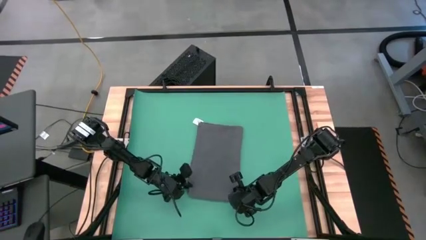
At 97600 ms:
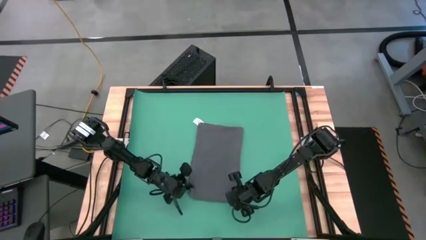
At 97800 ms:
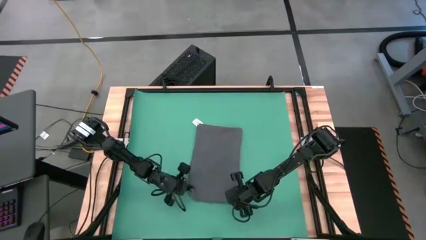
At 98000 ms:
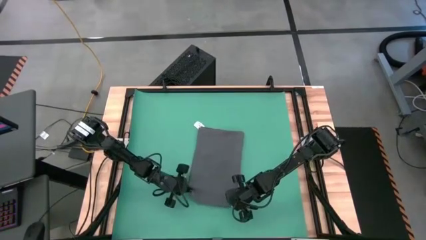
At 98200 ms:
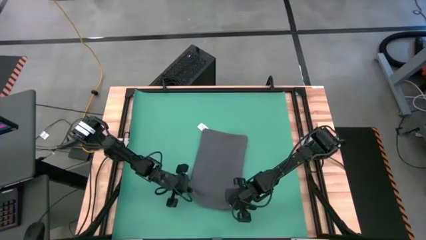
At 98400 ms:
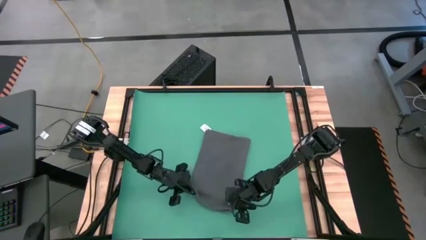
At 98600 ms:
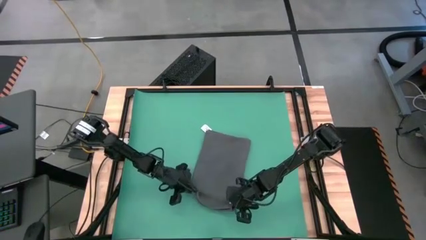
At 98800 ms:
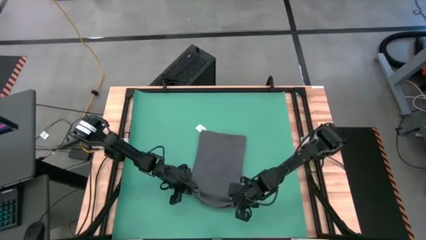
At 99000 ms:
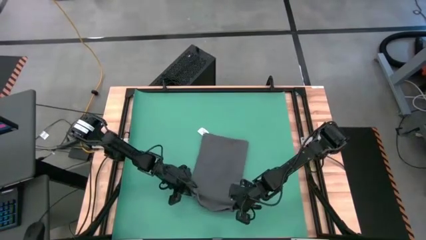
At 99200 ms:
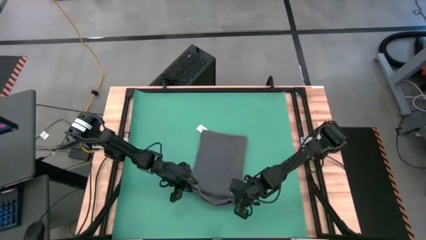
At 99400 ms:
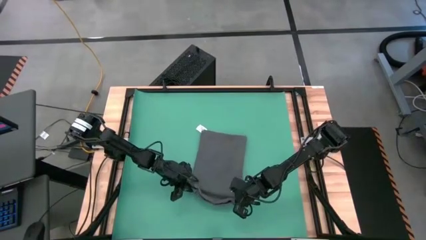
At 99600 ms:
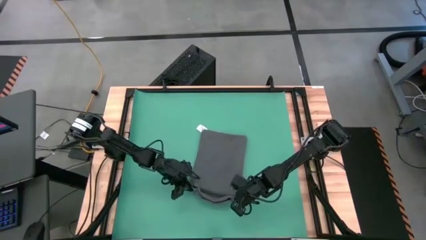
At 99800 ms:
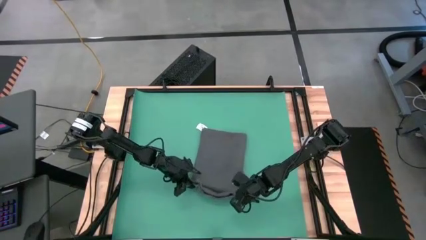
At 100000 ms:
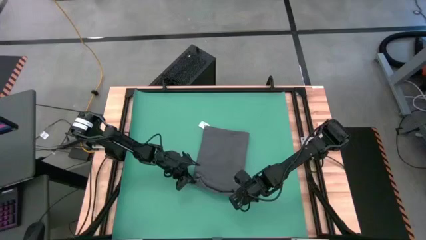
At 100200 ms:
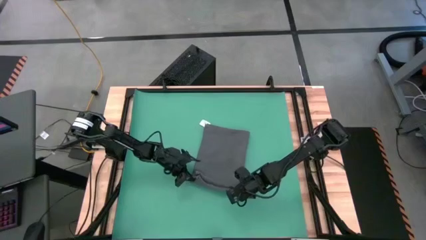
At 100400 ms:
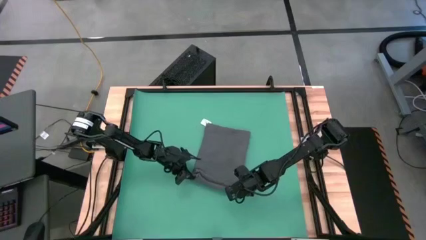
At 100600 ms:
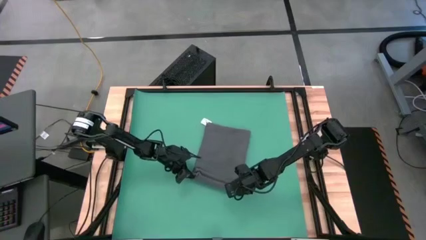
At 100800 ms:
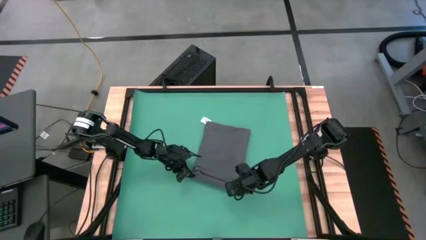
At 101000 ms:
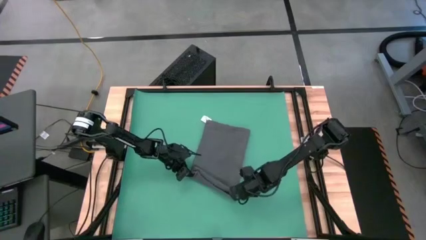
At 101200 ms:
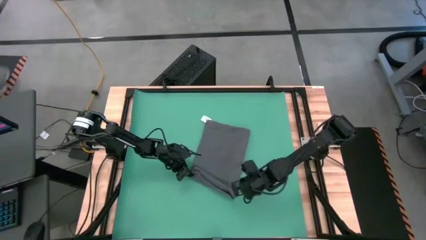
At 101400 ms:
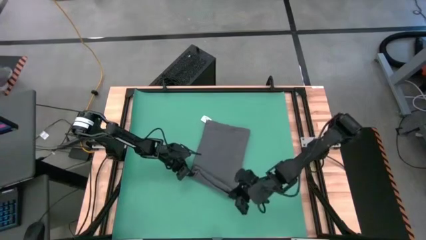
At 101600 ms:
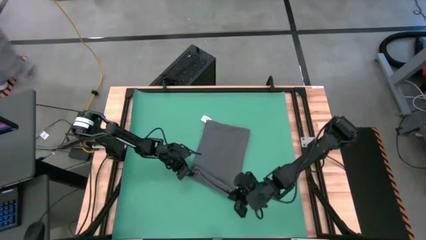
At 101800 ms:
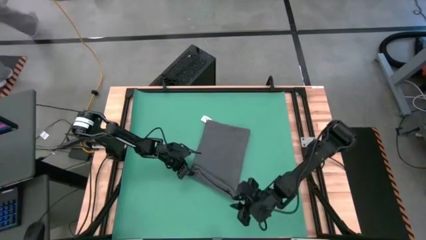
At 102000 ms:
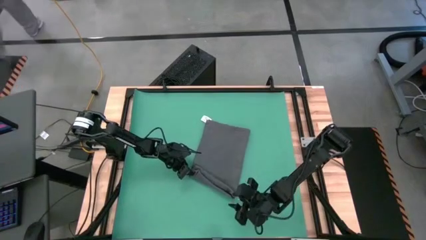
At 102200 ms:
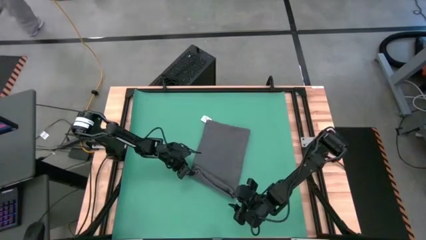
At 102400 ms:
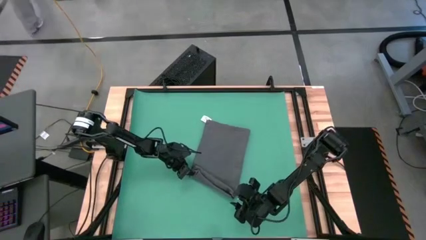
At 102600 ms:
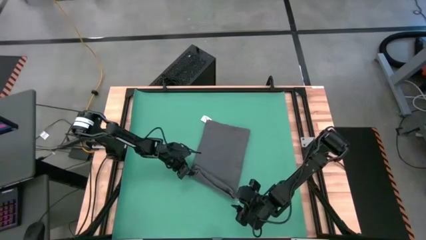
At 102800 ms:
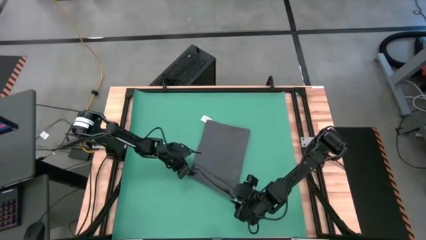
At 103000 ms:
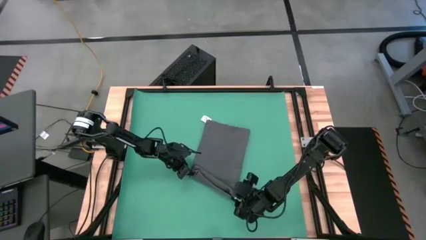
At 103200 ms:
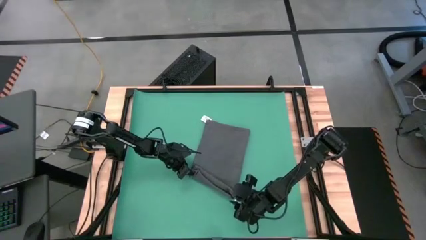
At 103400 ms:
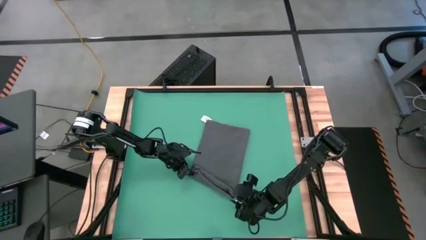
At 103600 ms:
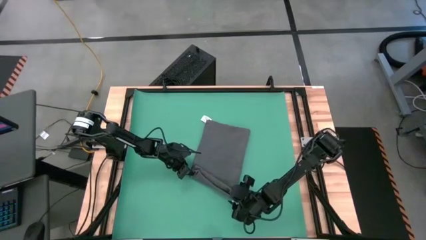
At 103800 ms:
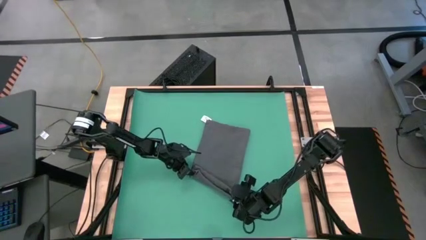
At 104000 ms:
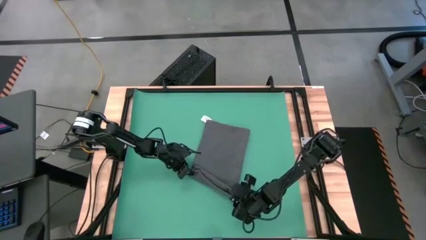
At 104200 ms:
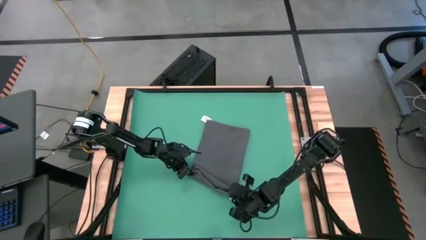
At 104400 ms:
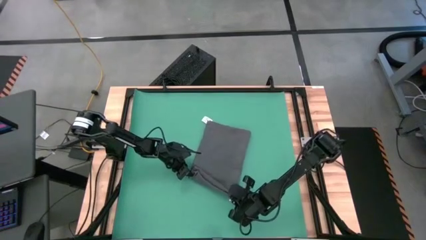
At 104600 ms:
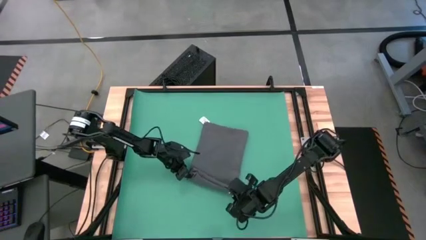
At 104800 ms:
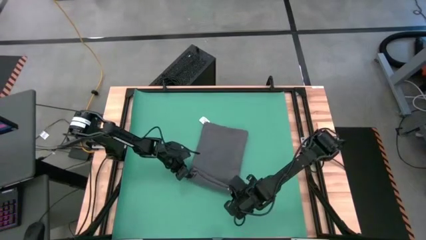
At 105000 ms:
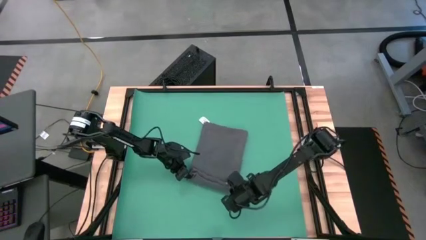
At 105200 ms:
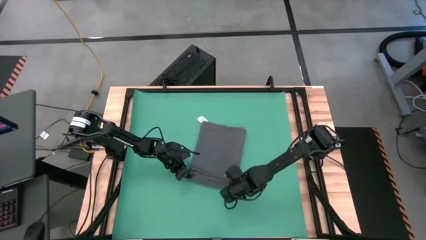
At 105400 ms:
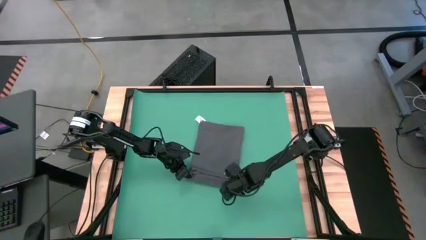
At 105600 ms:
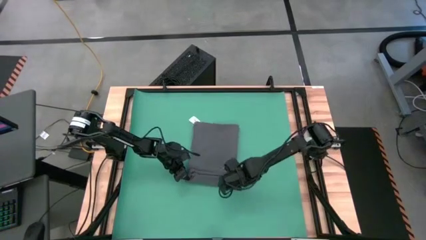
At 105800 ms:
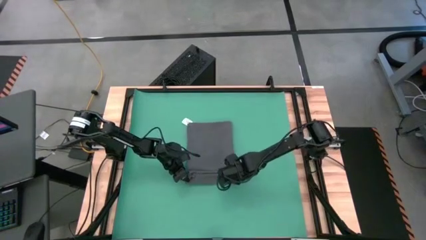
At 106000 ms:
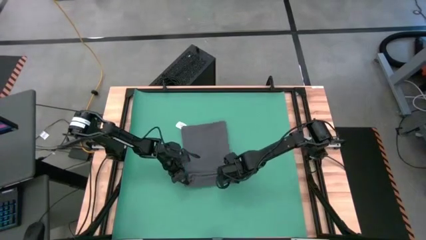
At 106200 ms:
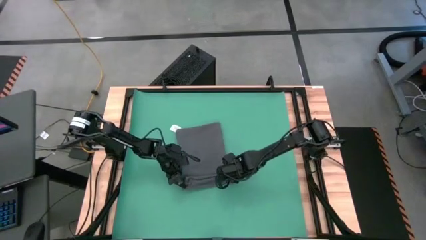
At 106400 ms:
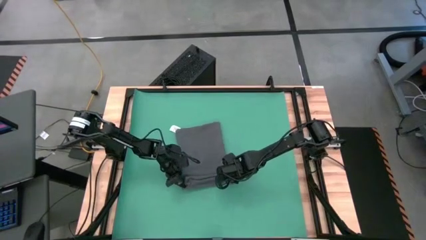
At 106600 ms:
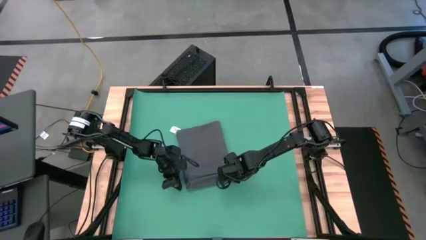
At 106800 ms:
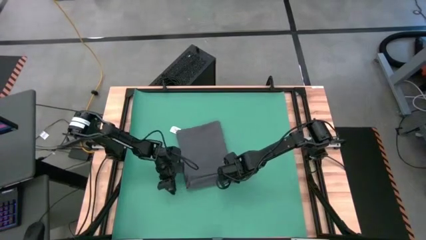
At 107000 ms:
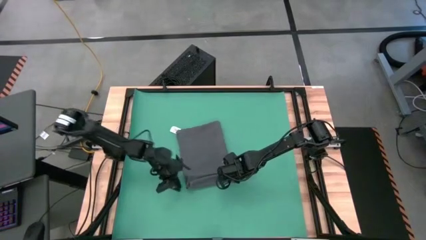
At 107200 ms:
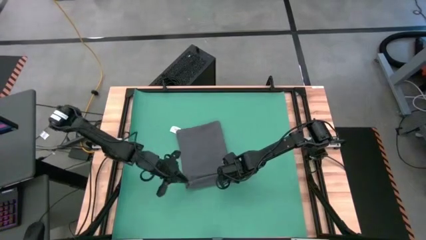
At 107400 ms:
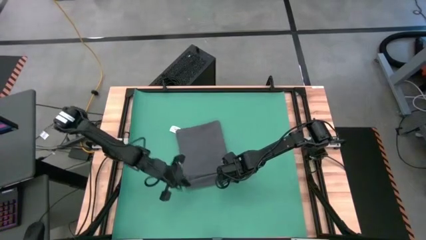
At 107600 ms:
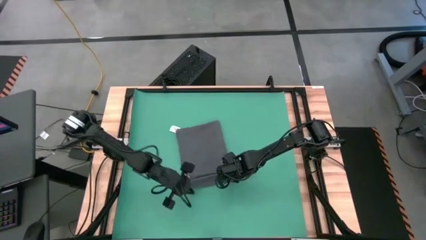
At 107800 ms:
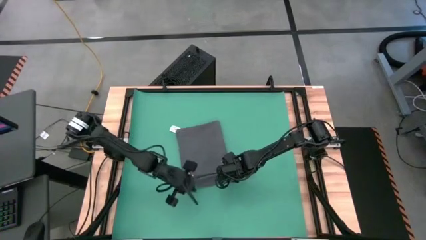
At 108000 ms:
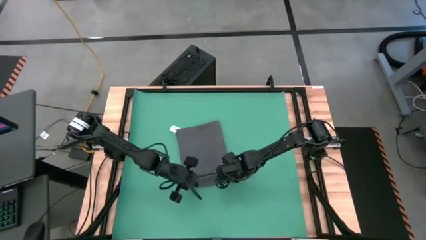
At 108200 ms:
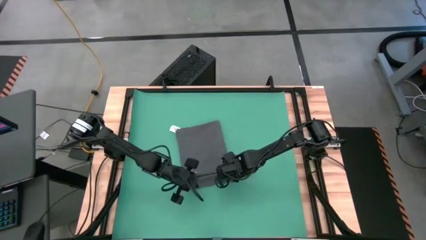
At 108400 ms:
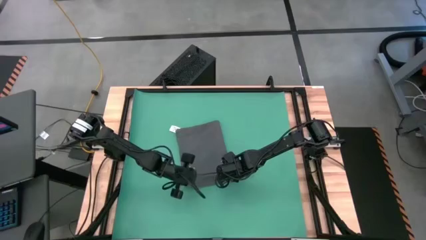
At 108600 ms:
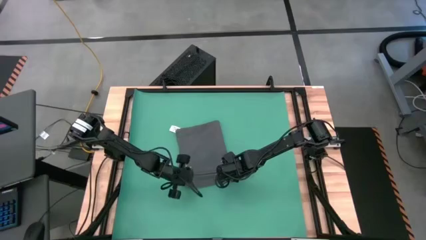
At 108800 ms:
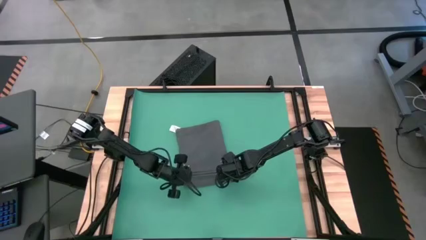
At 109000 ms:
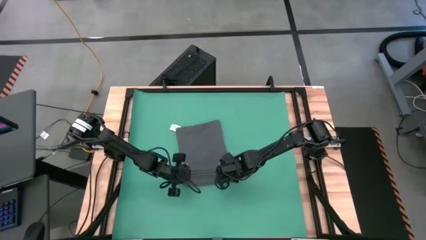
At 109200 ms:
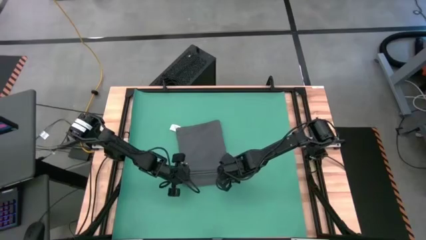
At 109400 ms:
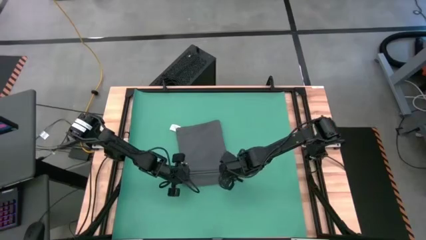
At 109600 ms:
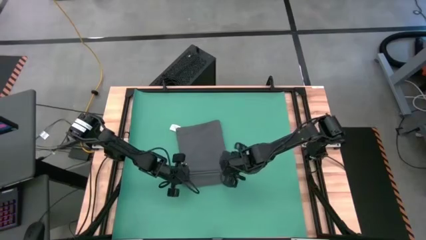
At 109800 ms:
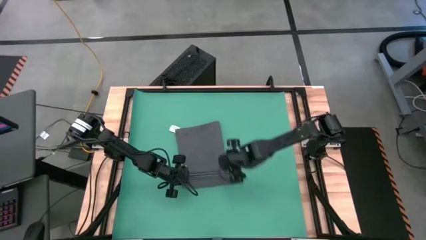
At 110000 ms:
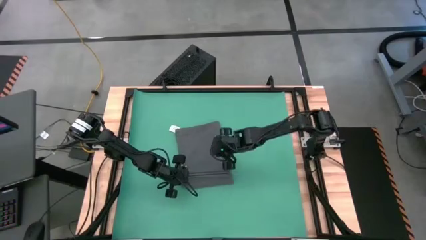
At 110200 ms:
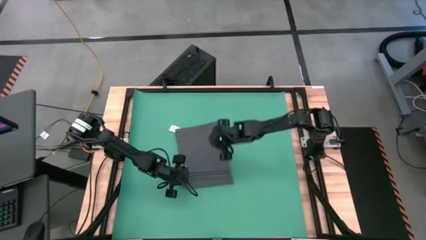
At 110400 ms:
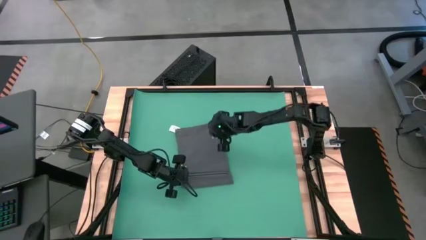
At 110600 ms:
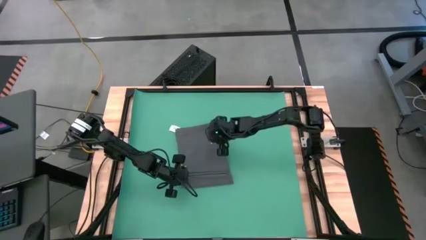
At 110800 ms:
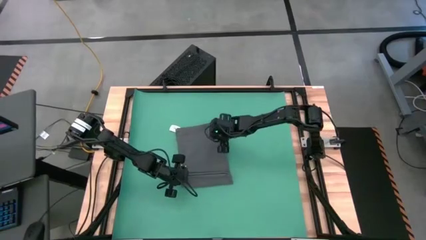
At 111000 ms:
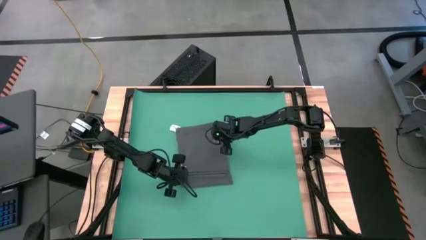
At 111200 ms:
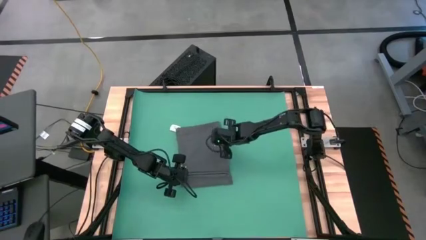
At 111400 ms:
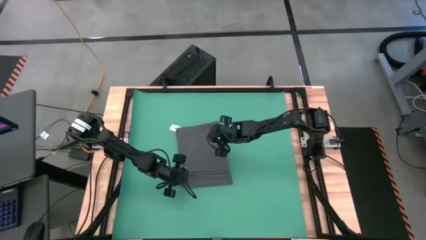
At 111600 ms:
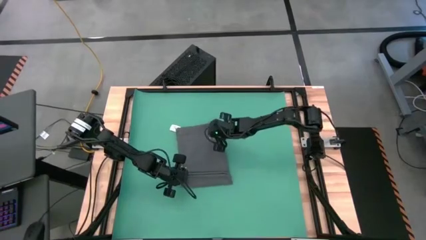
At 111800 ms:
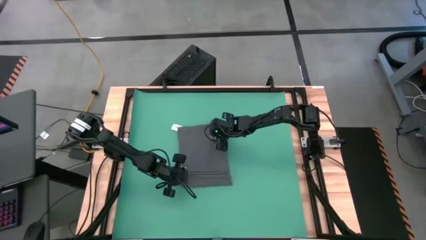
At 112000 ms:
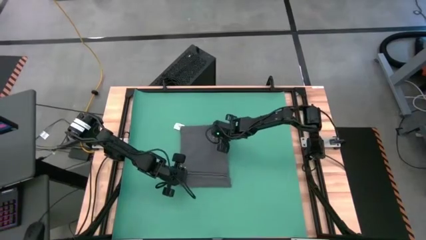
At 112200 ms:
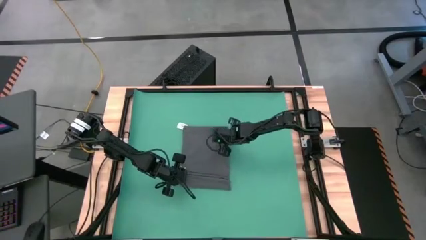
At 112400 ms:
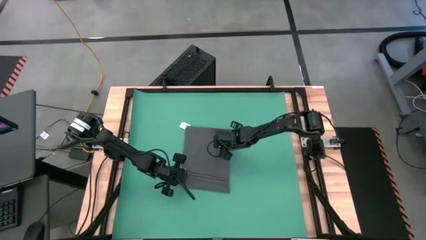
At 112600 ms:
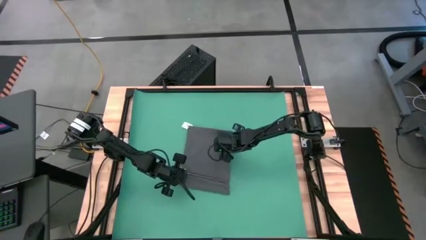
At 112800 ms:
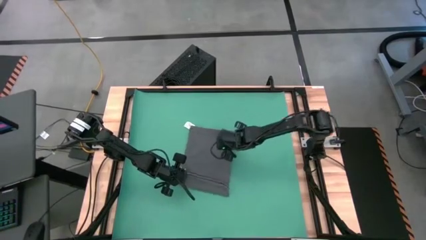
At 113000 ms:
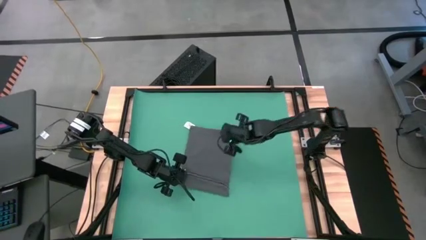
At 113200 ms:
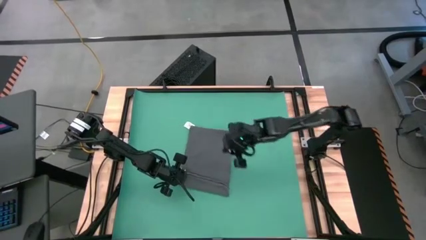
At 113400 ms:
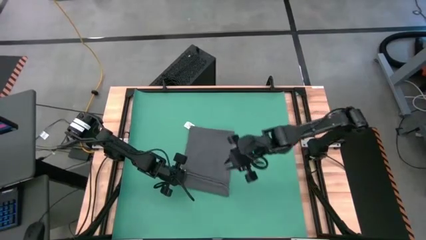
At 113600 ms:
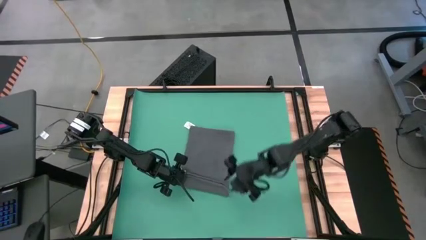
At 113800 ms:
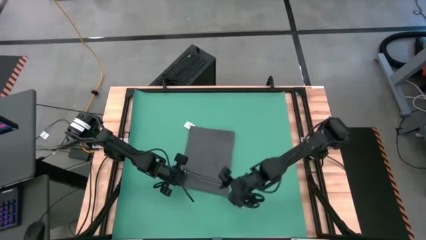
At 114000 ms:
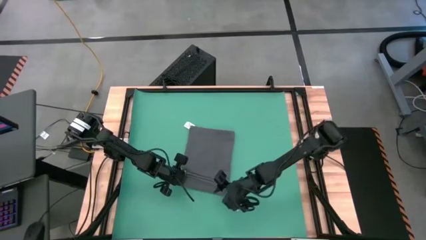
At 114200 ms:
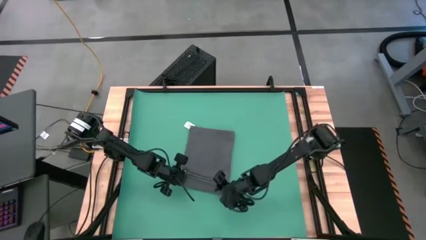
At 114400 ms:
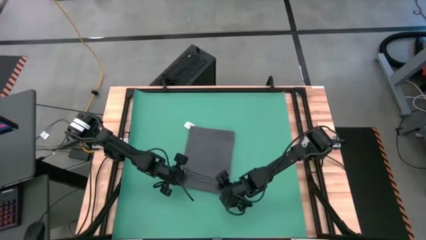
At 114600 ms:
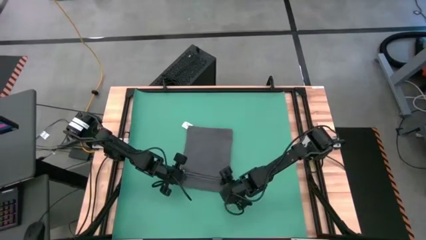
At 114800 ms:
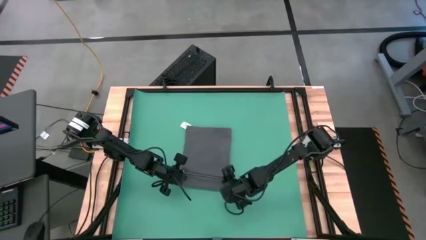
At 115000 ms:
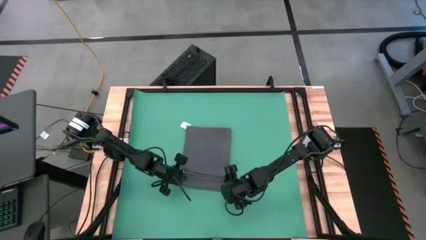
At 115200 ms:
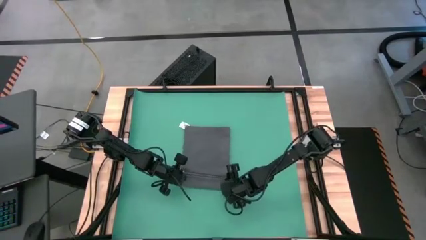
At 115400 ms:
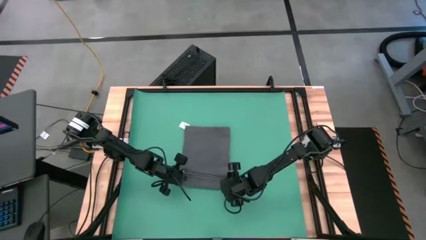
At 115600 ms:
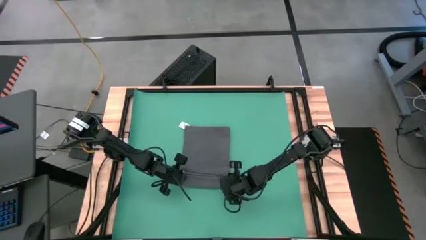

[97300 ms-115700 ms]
Task: Roll towel
Roll the gray towel
